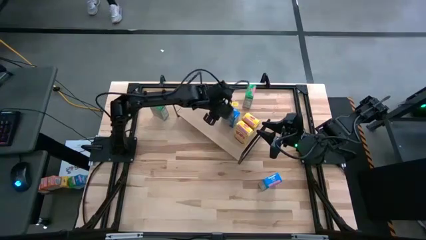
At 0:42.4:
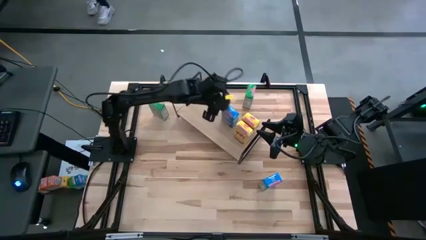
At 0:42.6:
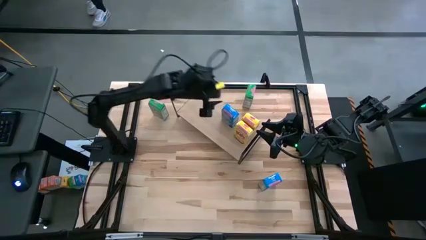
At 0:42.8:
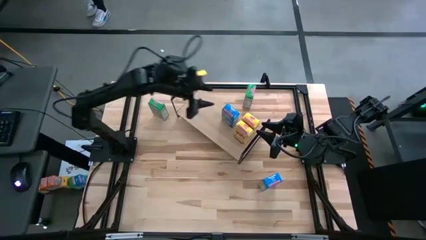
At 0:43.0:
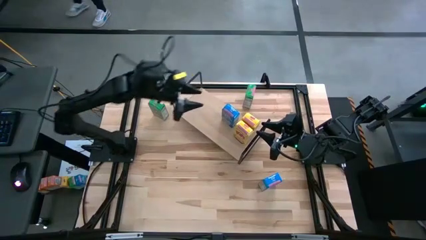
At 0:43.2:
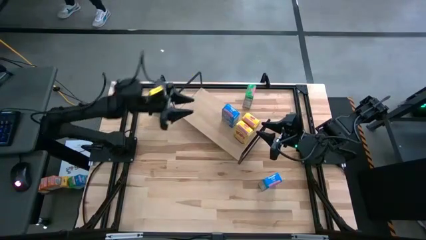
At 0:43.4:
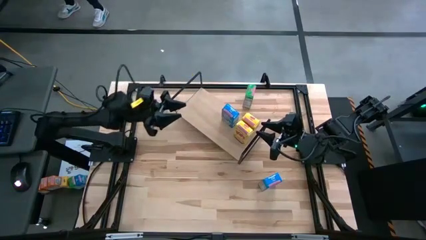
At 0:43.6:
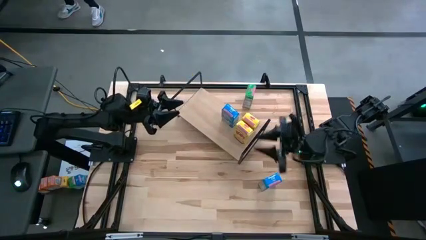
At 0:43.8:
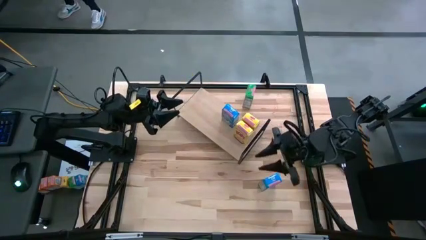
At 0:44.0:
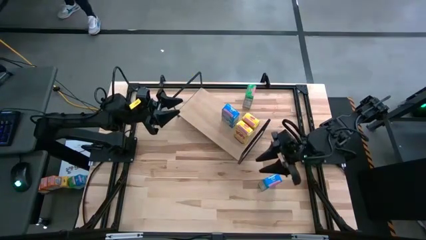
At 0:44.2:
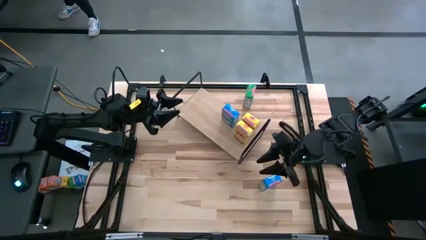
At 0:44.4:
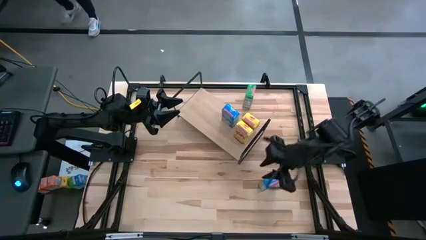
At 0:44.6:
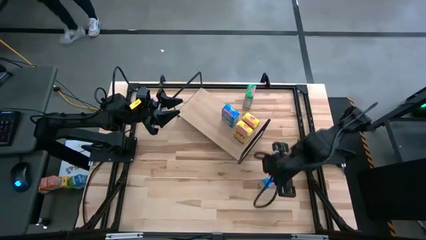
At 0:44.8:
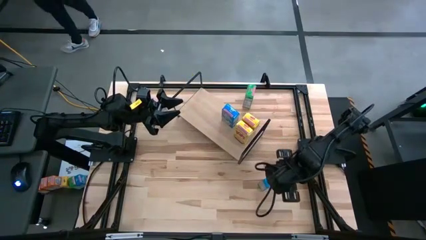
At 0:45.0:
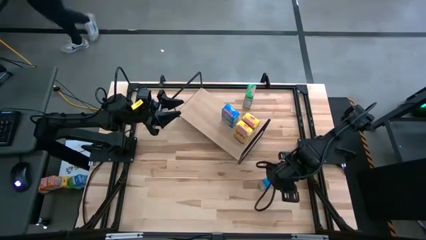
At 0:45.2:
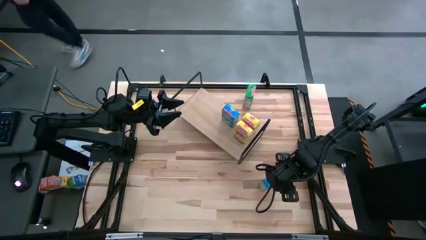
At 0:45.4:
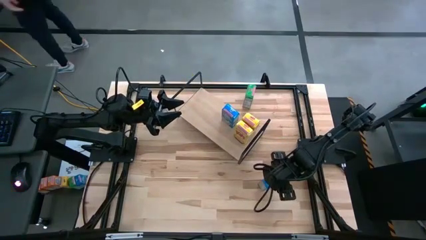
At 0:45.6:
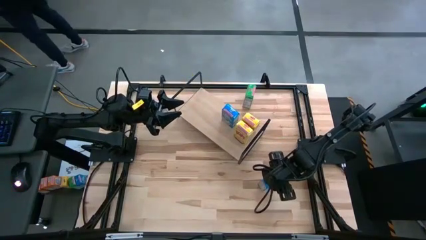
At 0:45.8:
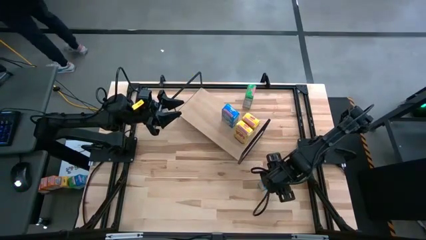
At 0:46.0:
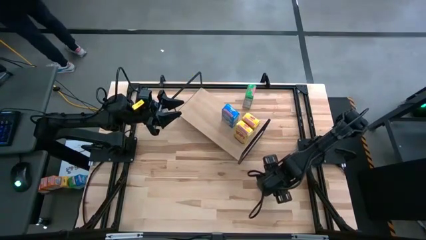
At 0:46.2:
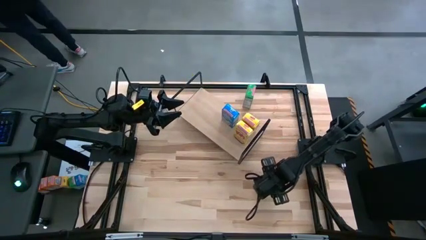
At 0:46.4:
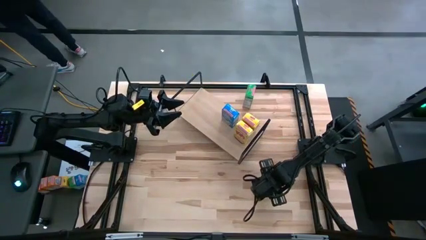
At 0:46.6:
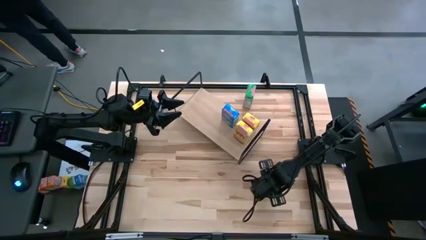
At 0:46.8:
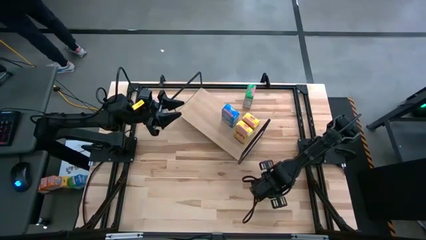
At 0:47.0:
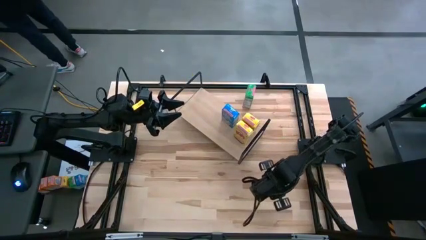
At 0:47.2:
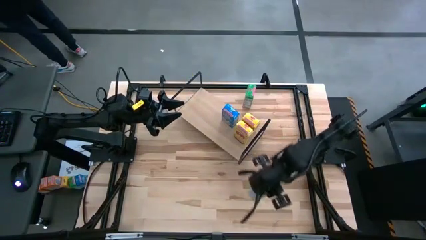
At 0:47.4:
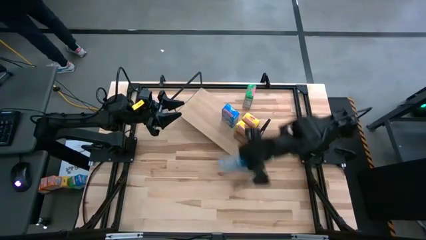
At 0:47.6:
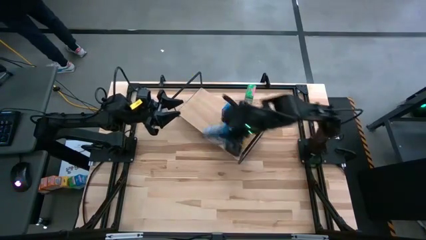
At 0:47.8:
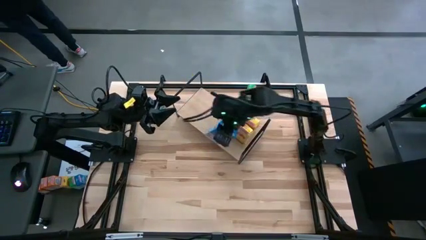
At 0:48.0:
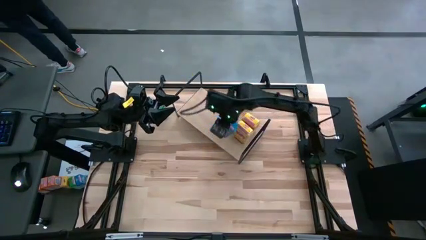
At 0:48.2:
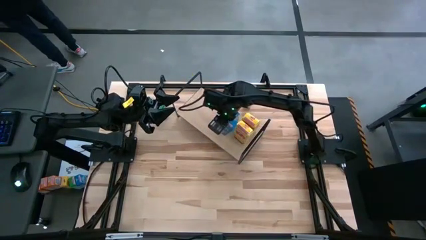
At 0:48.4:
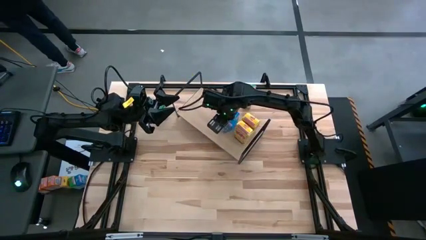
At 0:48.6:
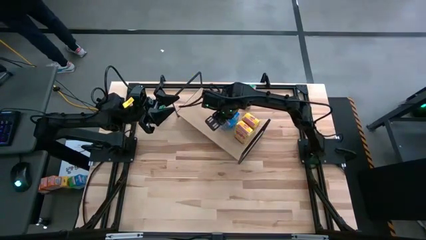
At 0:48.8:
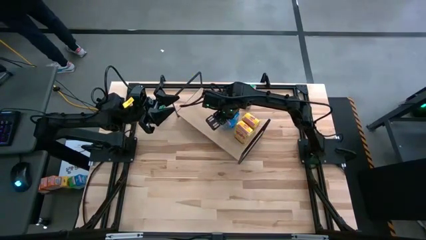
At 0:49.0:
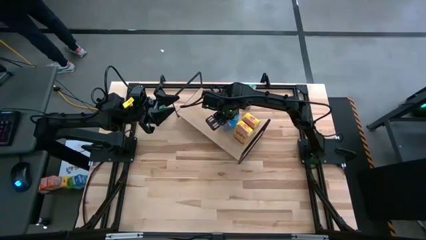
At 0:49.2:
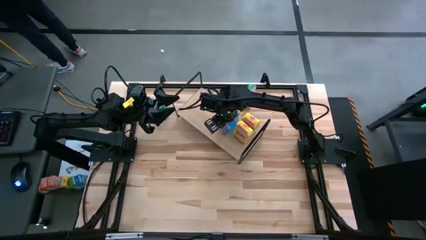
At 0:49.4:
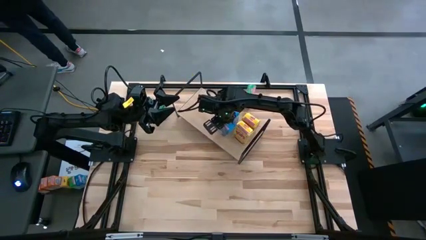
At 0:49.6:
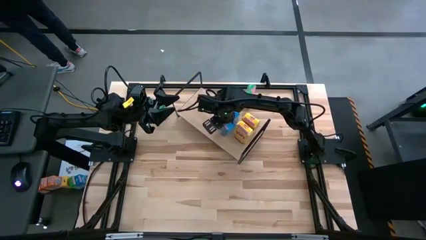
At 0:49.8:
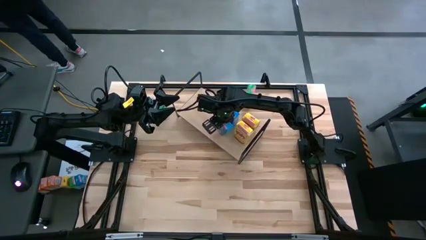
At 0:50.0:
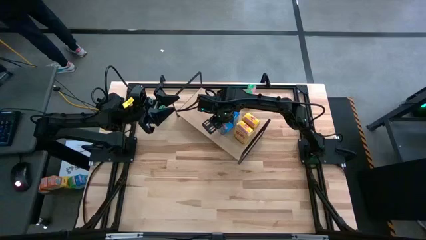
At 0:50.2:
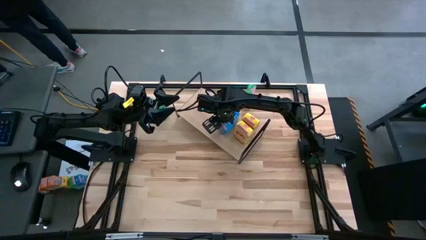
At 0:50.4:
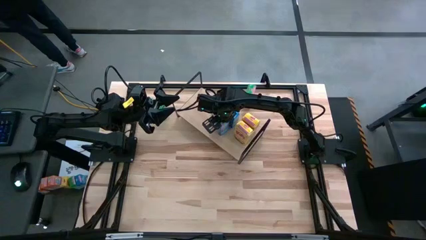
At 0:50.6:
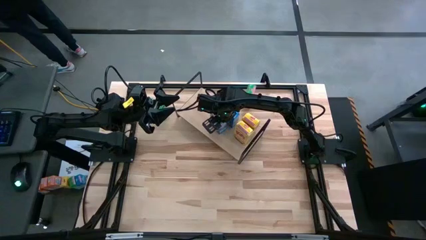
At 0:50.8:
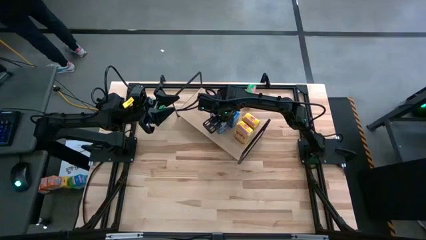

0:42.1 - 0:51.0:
Task: Stack cereal on shelf
Put the blue cereal box on the shelf aligned with the other blue cereal box

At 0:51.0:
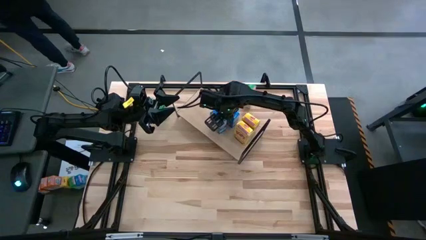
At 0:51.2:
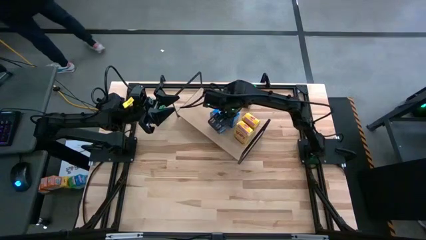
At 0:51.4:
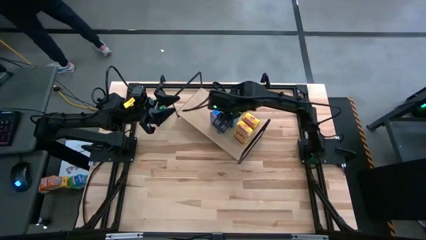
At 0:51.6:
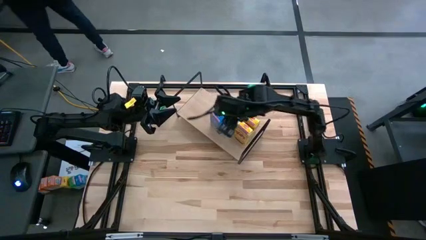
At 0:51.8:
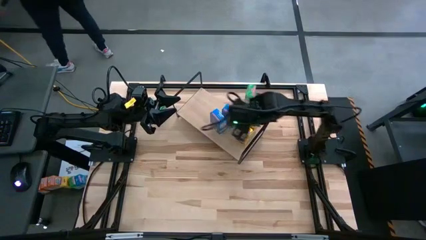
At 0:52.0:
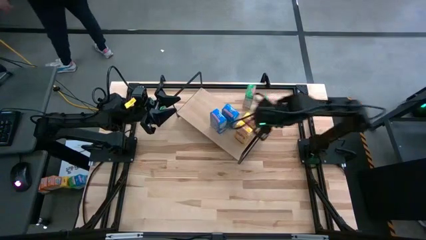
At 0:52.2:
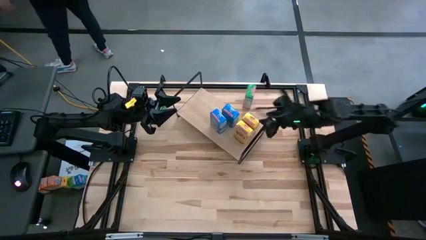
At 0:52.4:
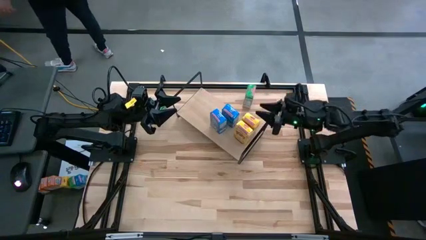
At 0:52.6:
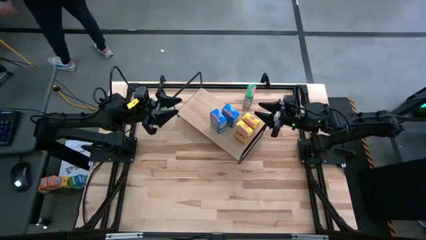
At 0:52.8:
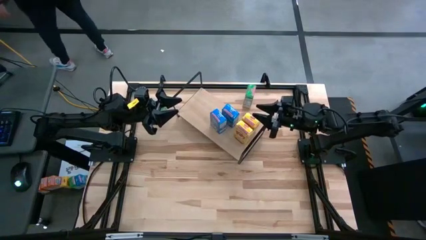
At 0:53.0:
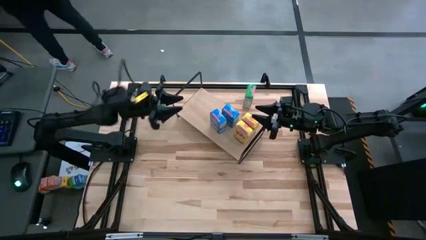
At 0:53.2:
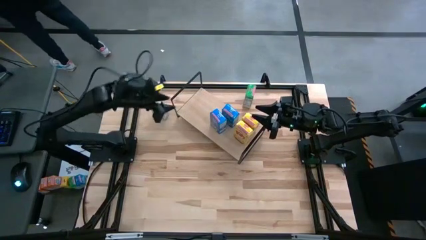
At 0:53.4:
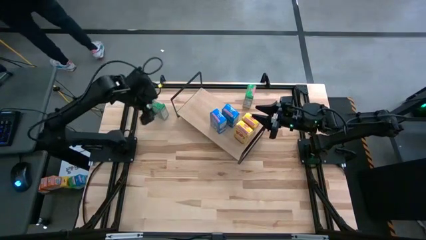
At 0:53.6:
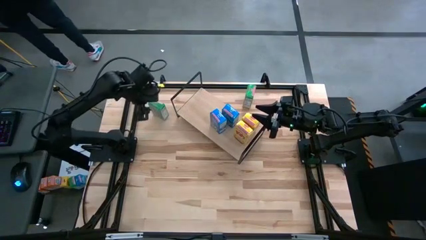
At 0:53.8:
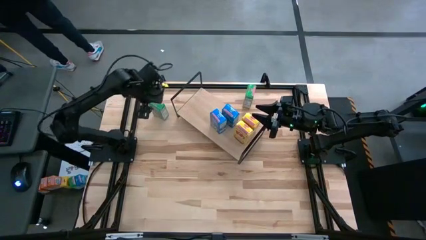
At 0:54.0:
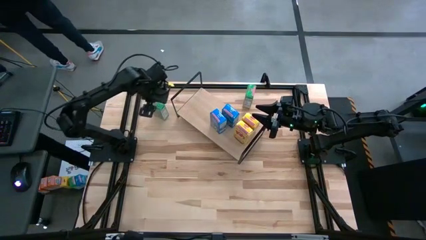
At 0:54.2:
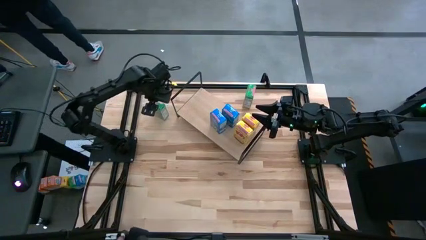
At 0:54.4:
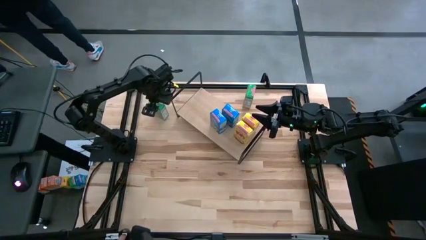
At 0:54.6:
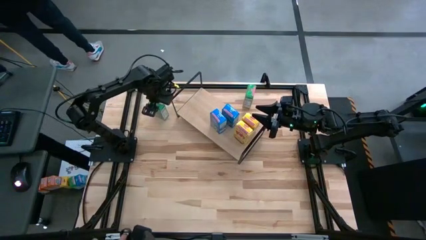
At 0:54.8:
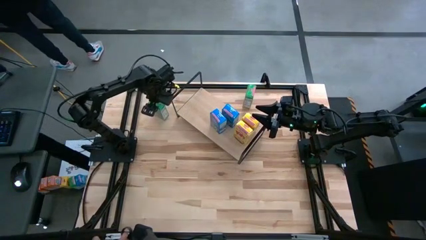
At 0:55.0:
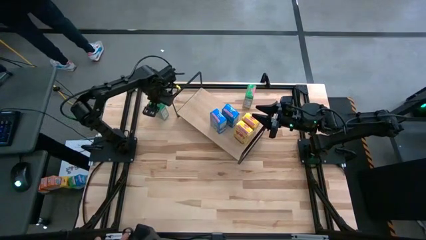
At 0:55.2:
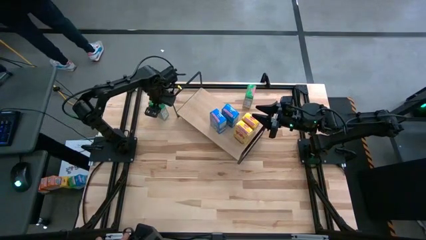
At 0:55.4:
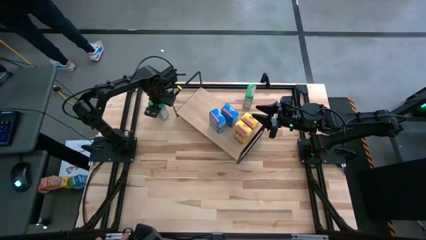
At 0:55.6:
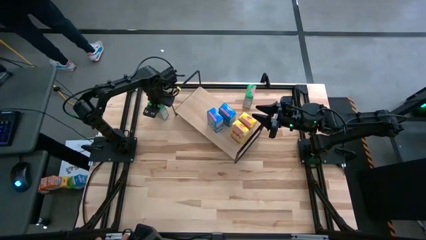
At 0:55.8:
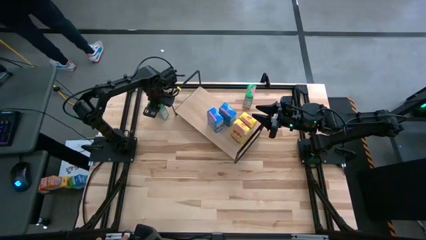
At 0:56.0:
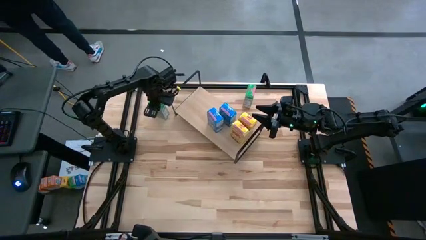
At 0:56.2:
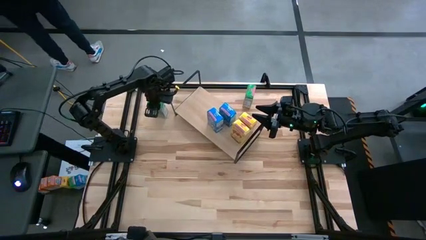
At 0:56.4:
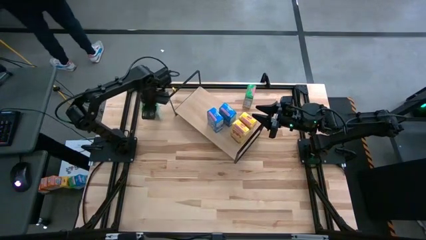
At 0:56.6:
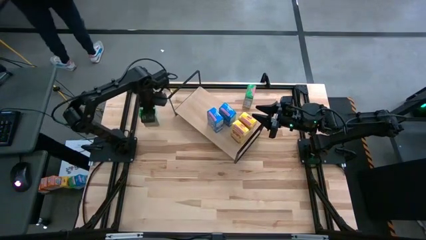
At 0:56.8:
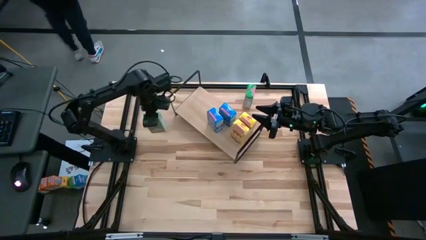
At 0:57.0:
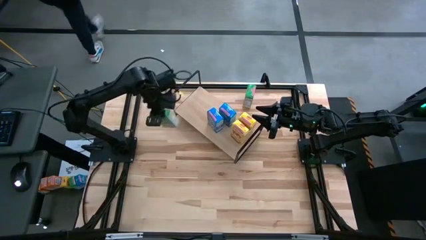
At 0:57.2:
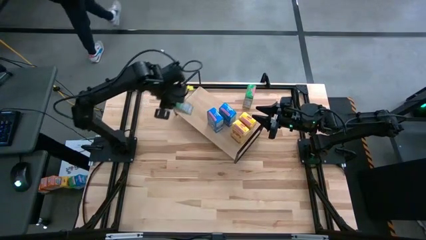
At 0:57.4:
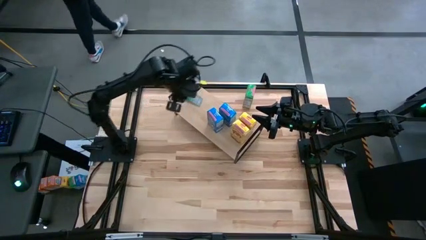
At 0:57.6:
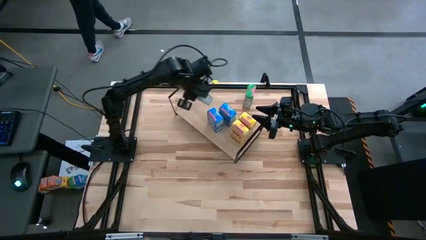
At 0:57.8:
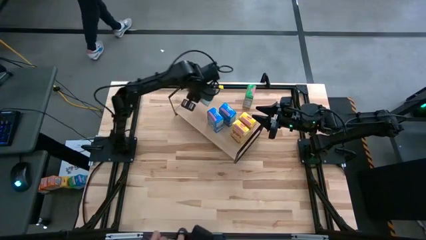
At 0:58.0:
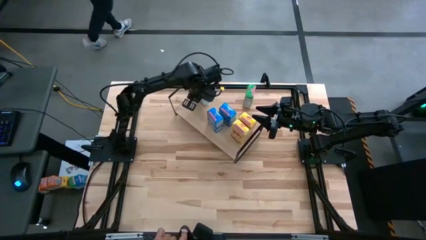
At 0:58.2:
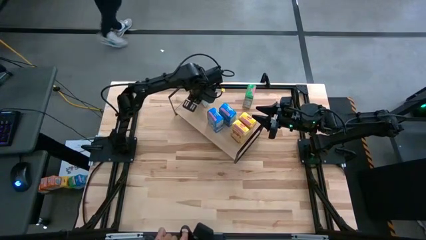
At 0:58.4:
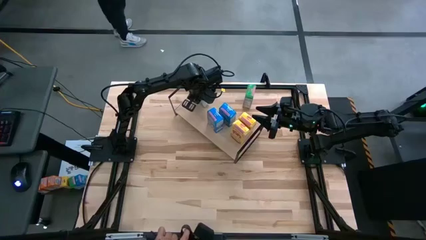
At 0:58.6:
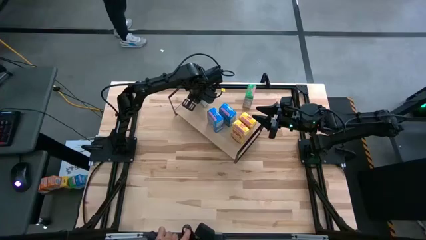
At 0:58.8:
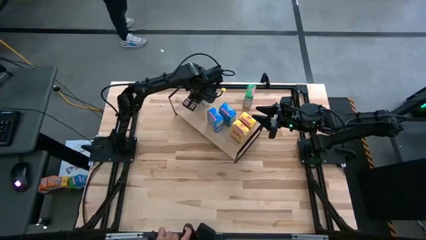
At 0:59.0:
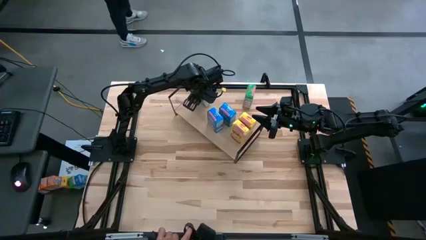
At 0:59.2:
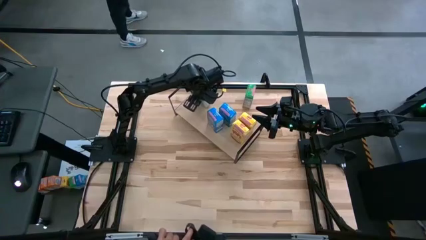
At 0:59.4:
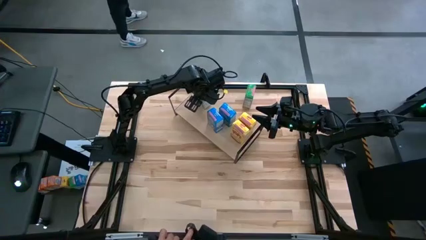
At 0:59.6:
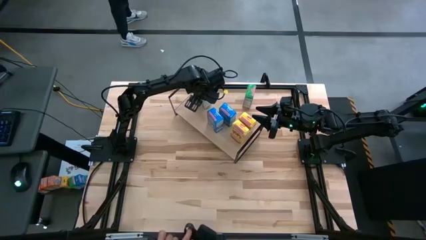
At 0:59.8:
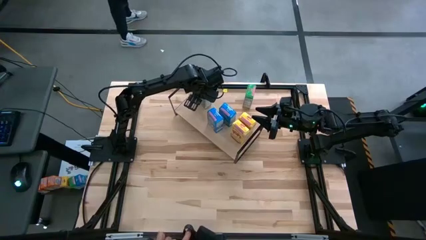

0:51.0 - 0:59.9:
Put the left green cereal box on the shelf
